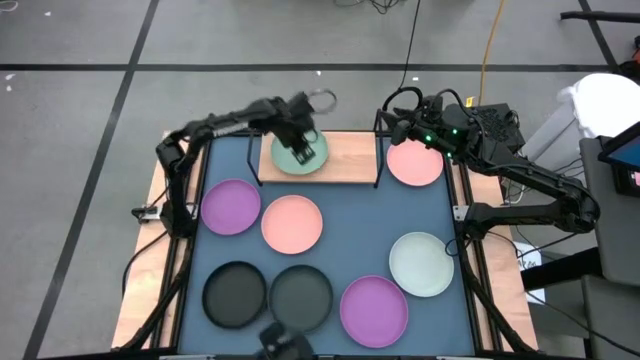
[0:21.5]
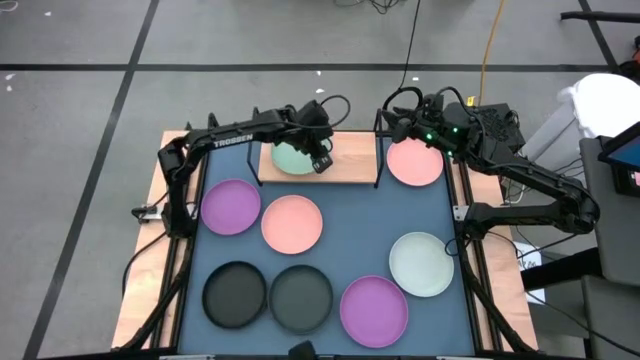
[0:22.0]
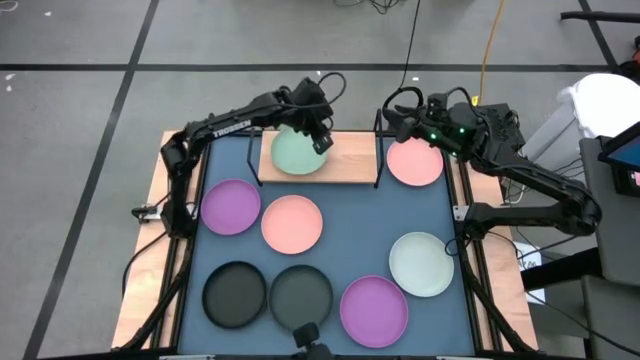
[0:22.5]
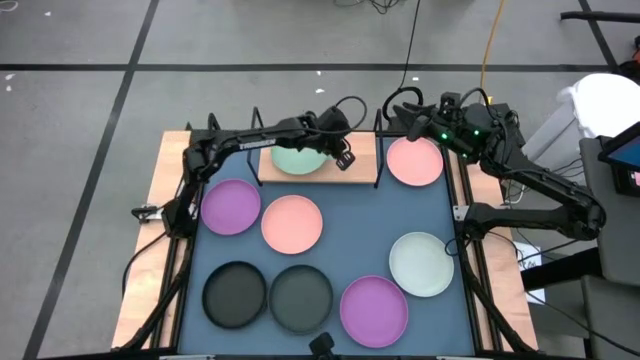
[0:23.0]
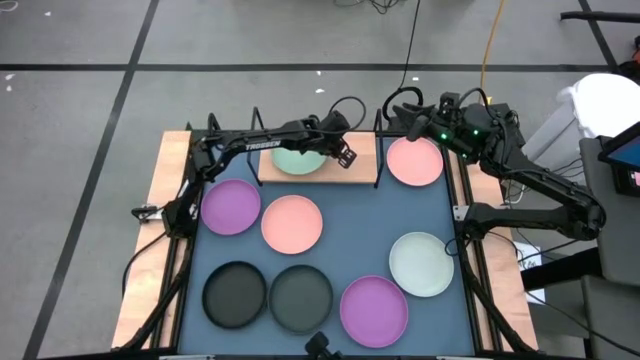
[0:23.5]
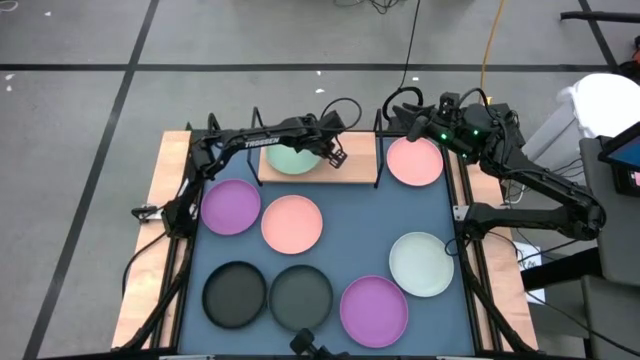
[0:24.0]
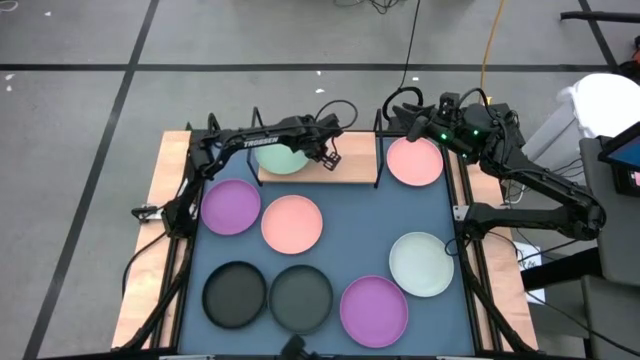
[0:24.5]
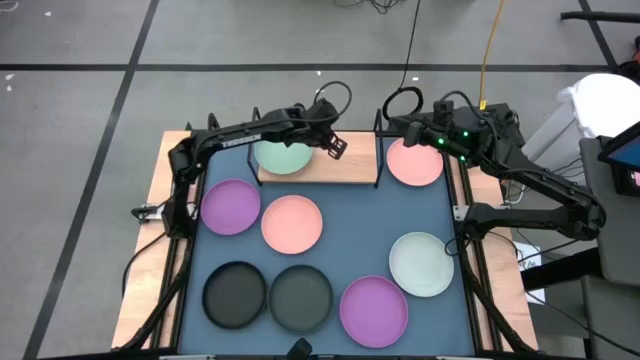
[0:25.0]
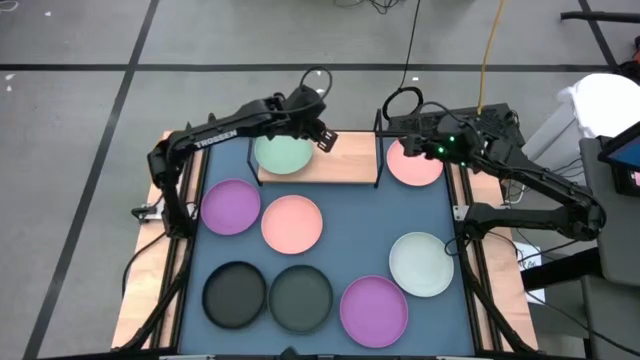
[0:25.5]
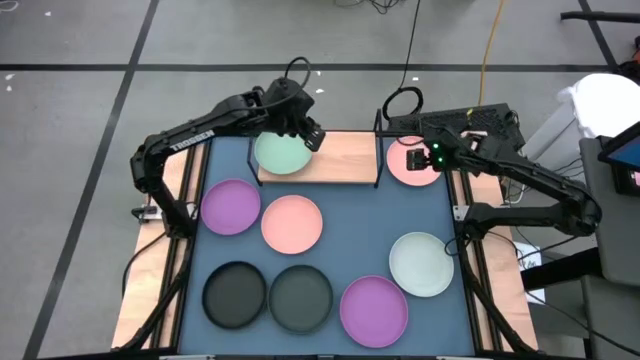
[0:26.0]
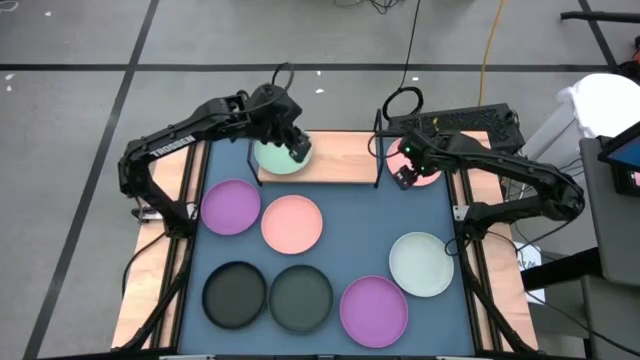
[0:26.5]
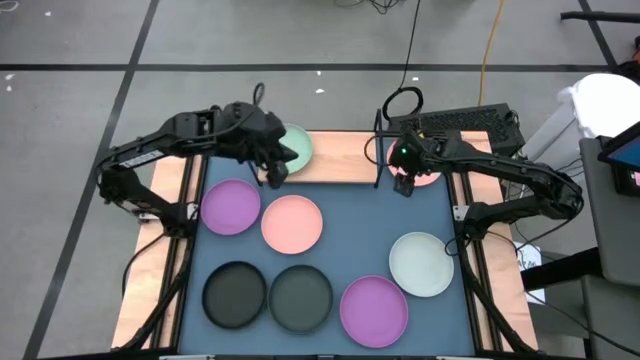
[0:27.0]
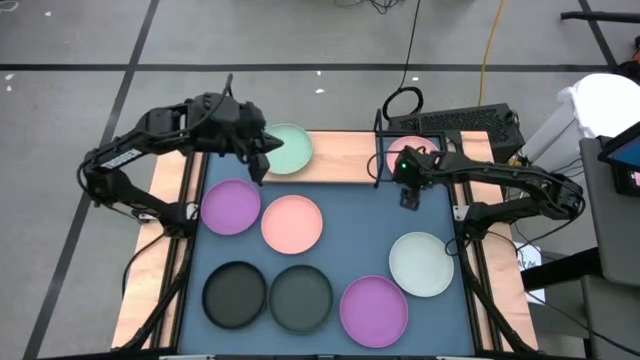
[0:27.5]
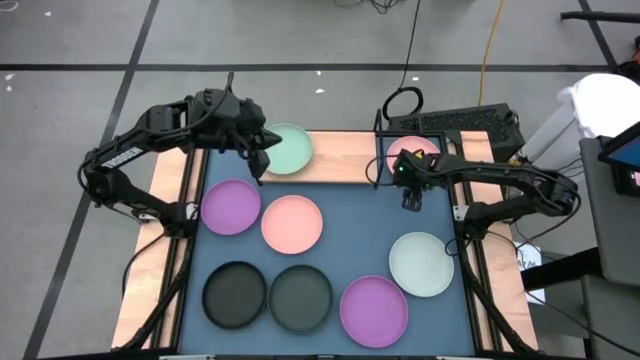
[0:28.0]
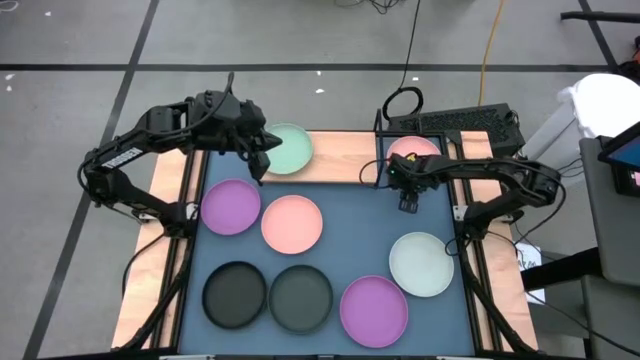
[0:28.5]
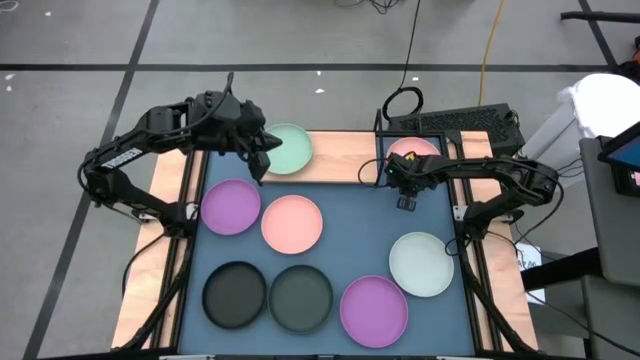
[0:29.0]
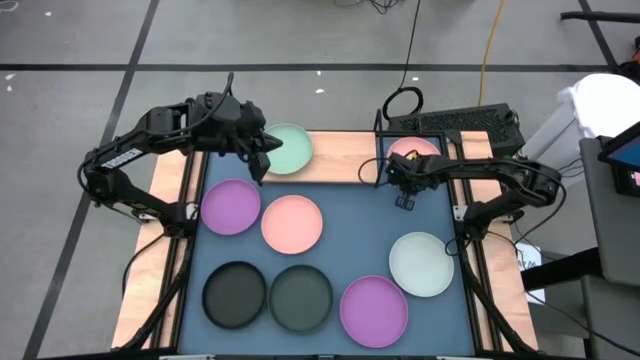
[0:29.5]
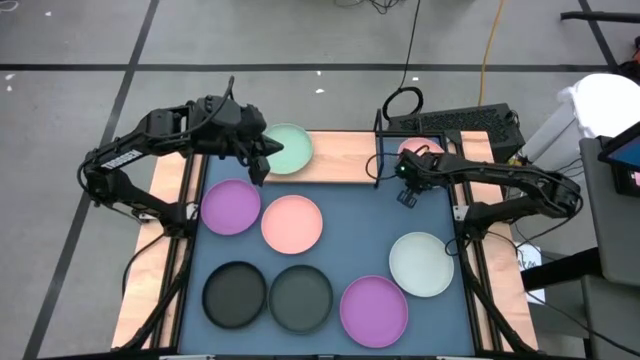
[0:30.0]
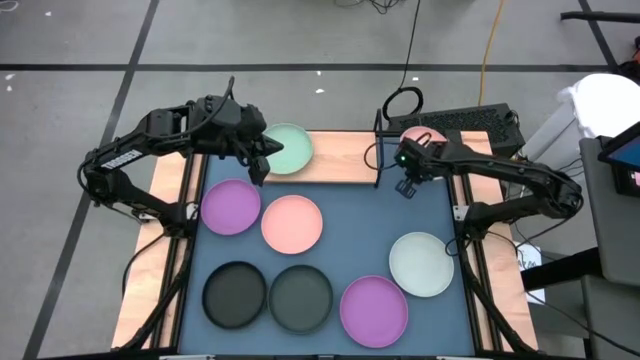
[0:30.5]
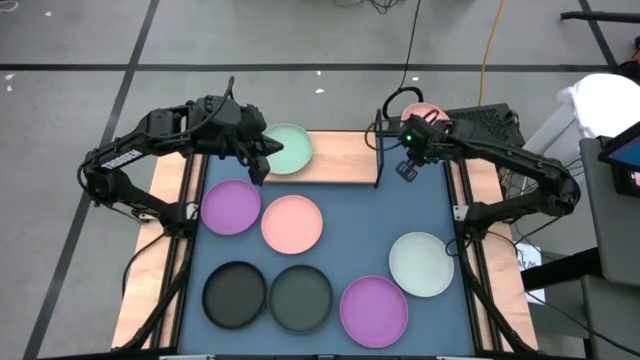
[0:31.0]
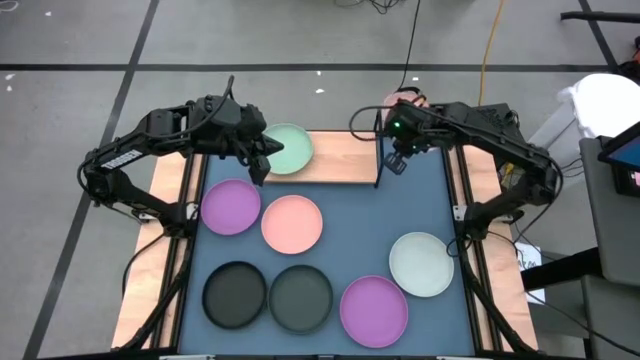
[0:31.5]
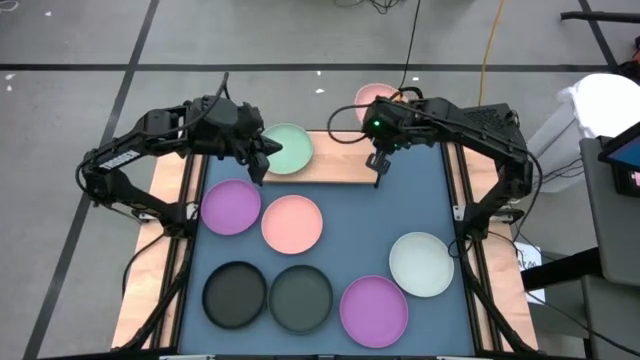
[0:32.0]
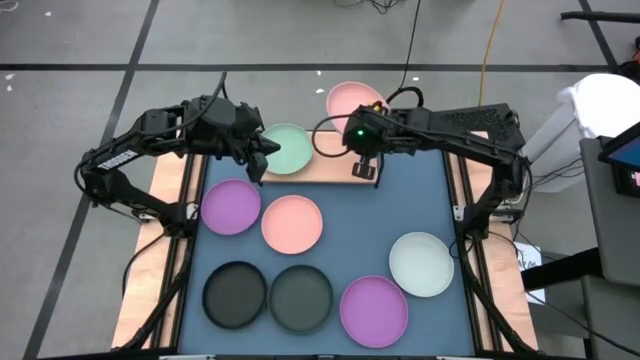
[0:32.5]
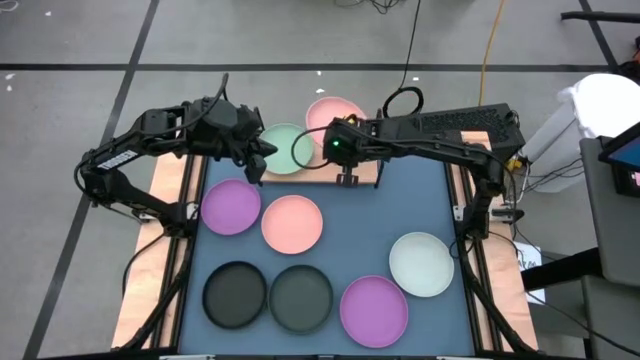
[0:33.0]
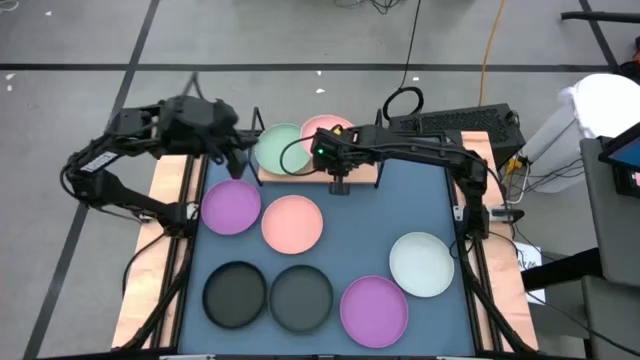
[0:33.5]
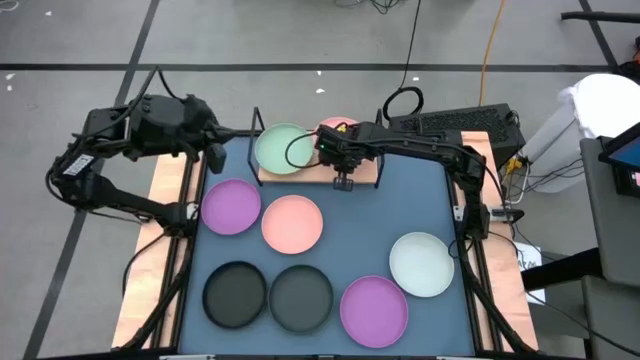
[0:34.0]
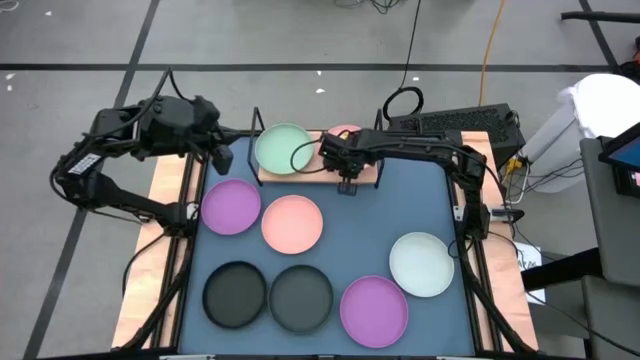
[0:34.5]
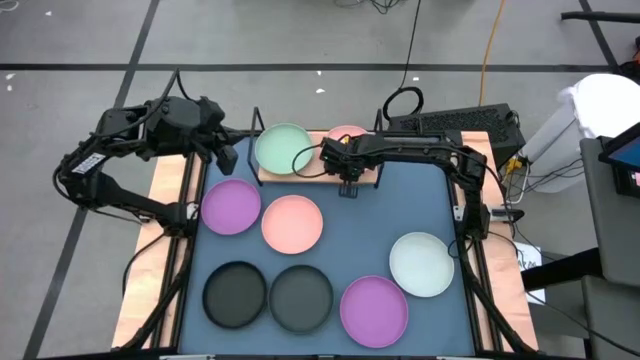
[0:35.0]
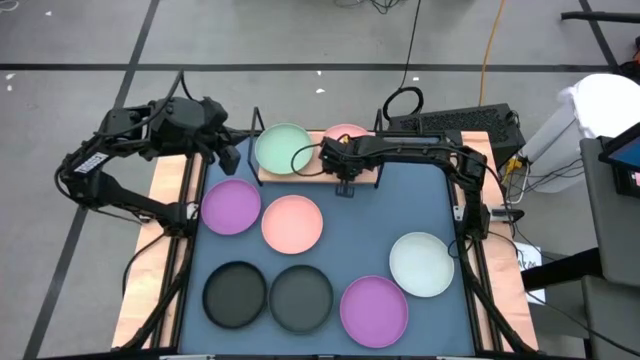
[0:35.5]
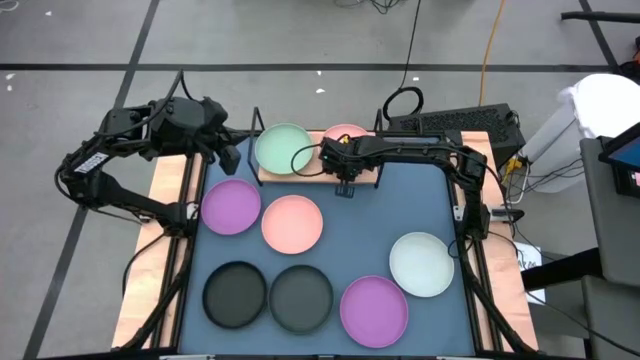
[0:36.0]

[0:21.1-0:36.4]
Task: Place and stack plates onto a shelf
Put the right pink plate on the shelf

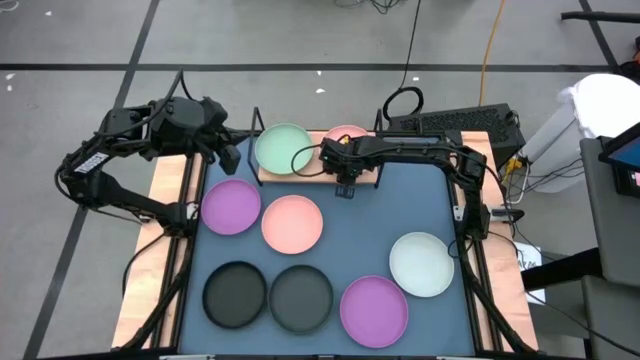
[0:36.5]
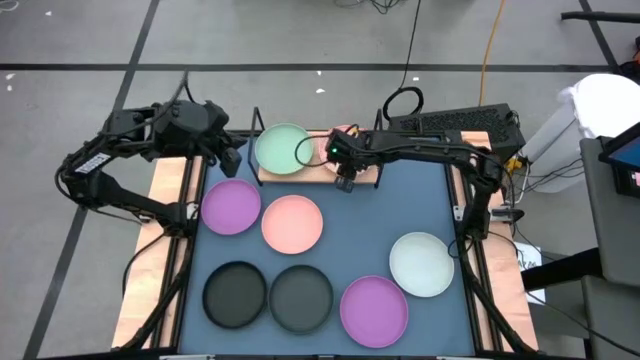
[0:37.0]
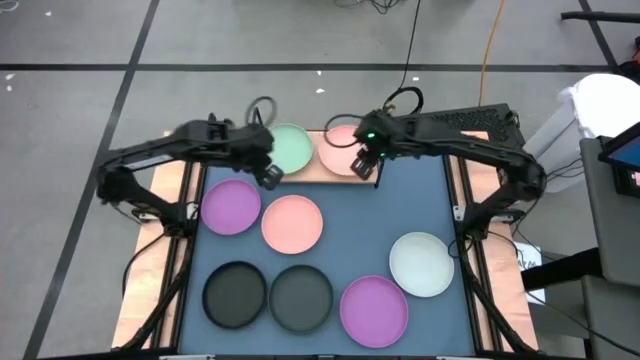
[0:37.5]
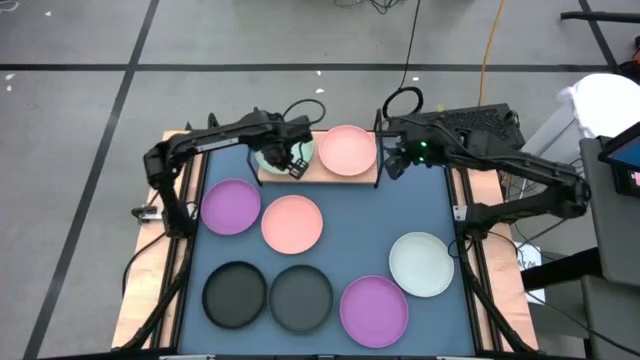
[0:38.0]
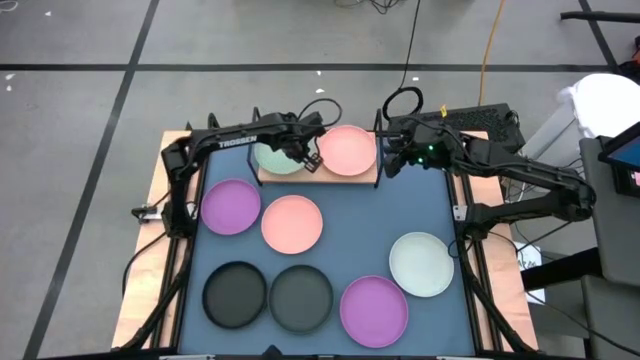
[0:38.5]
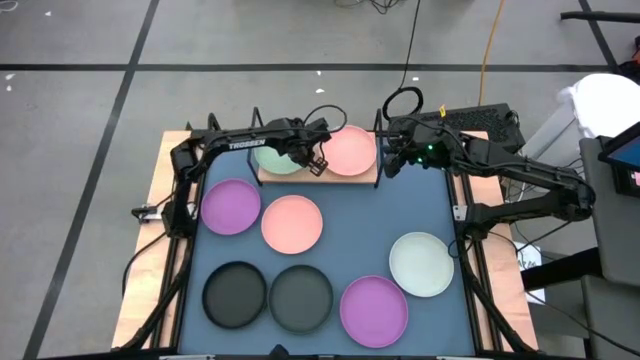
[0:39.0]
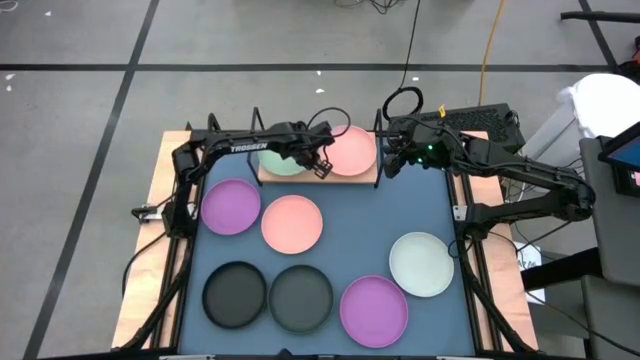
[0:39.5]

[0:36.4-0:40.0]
Adjust the green plate on the shelf

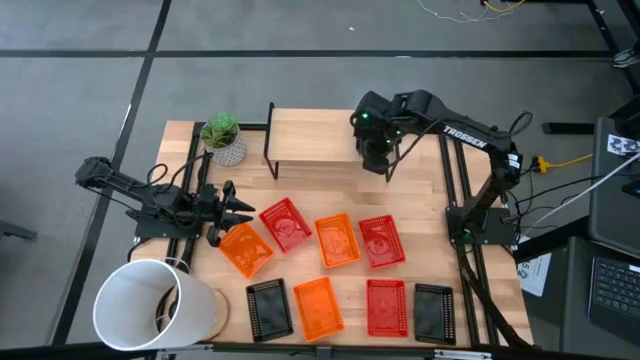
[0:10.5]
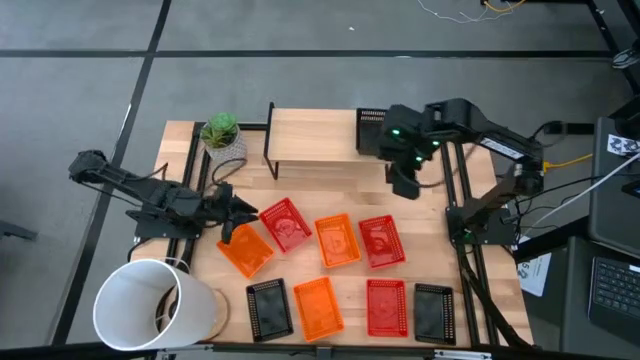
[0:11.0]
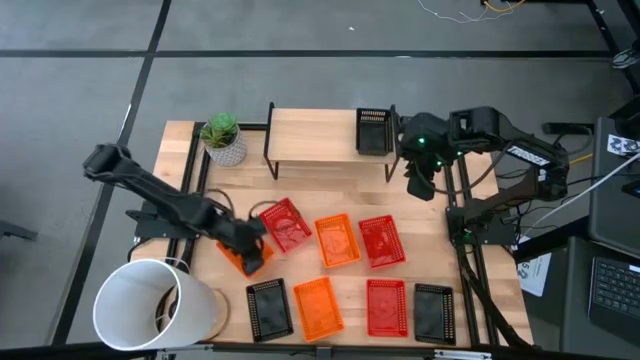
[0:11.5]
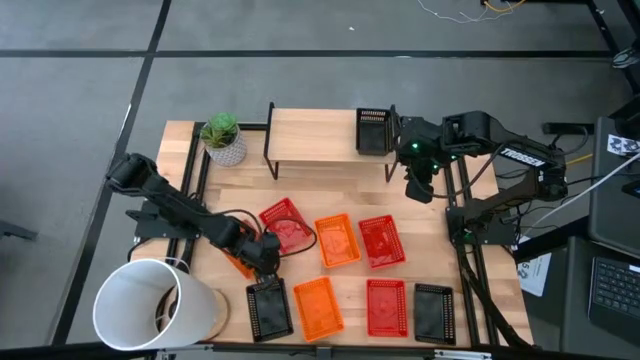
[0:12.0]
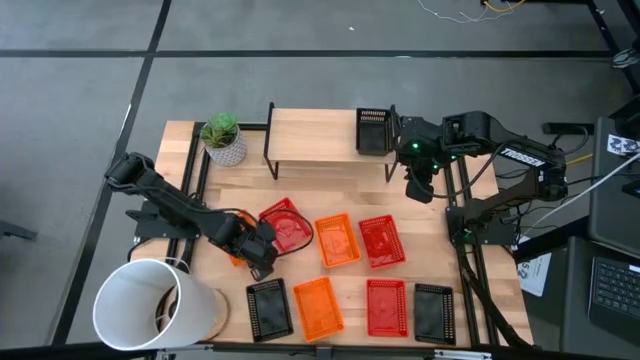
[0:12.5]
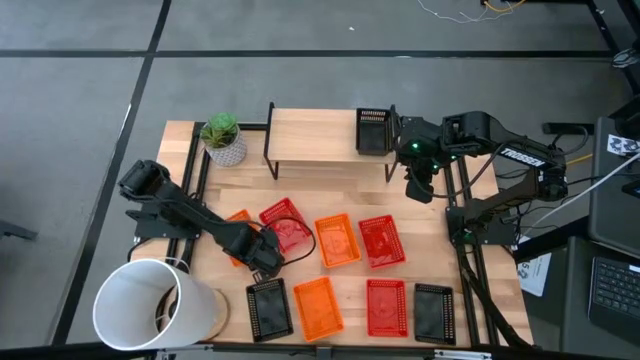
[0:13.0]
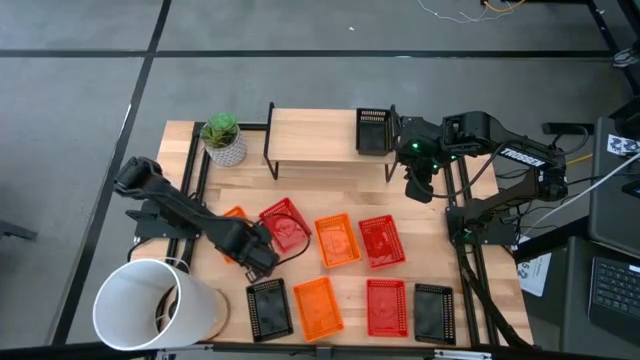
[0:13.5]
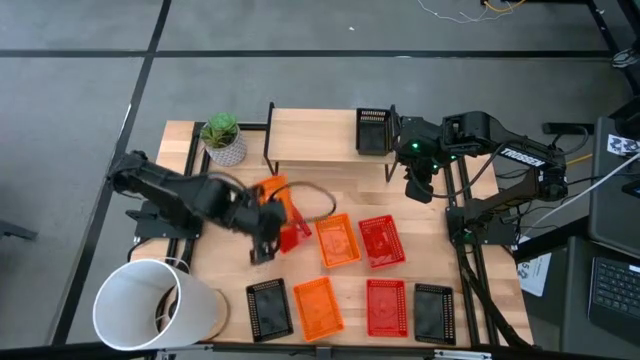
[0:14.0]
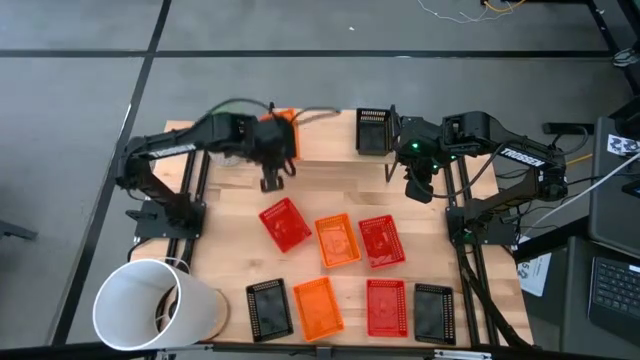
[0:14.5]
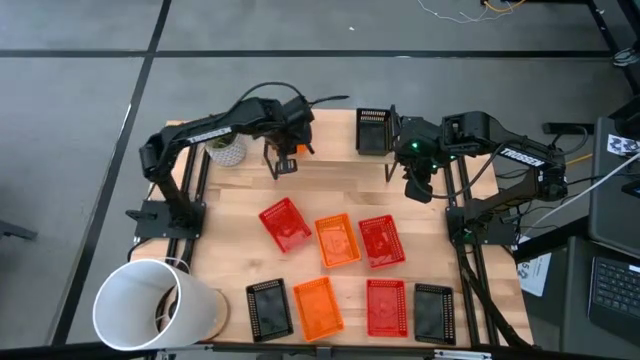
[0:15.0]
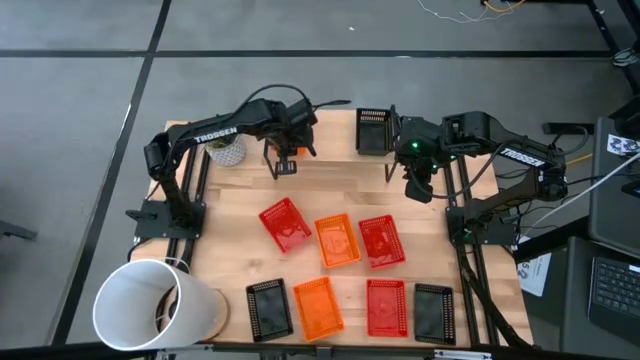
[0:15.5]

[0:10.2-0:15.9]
Task: Stack baskets on shelf by color
Put the top left orange bin on the shelf aligned with the other bin
